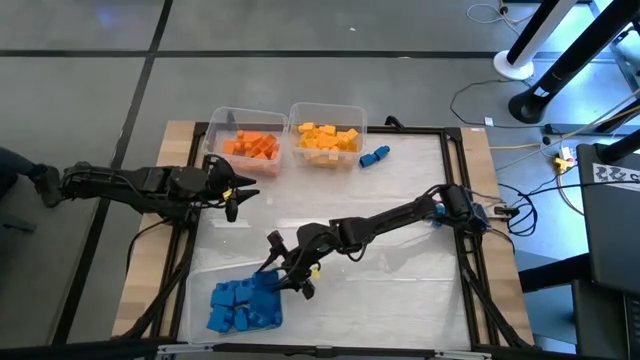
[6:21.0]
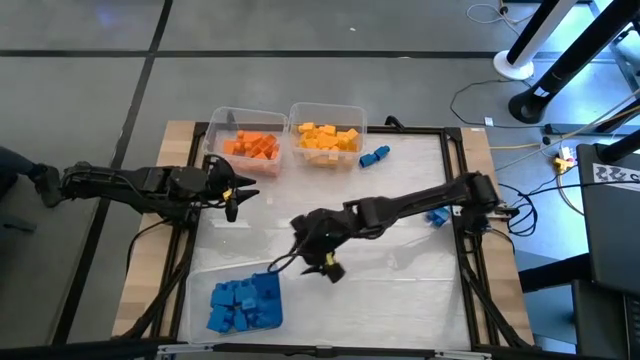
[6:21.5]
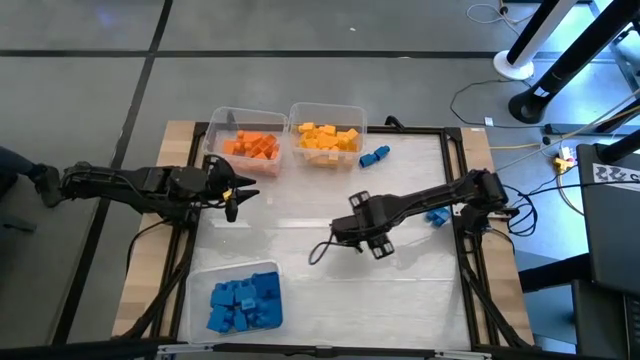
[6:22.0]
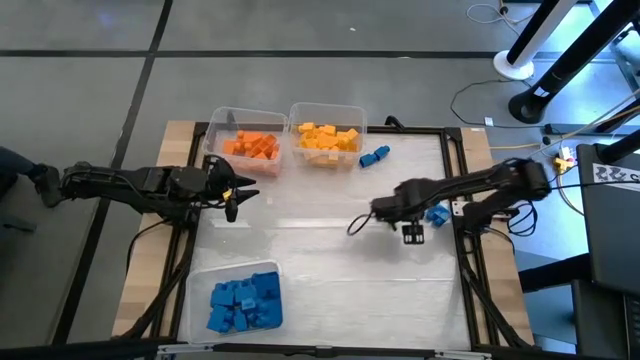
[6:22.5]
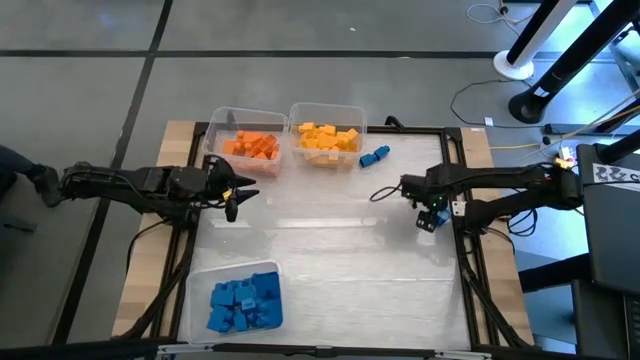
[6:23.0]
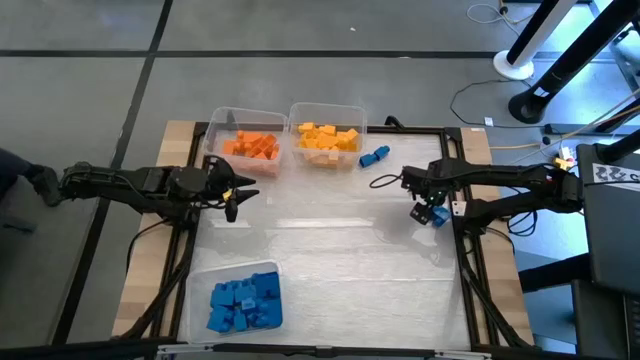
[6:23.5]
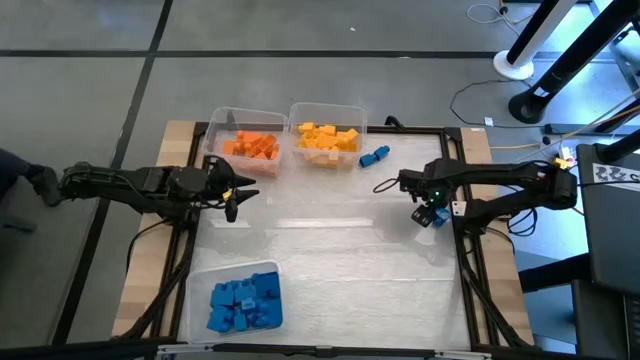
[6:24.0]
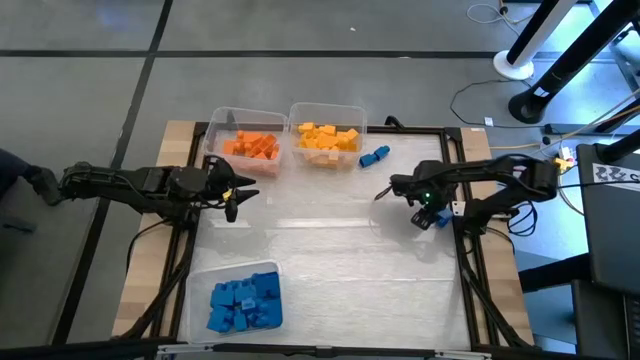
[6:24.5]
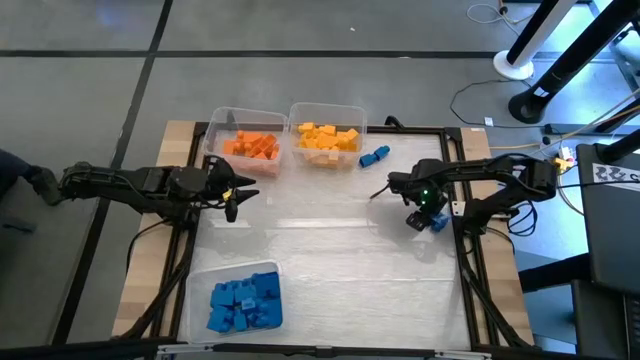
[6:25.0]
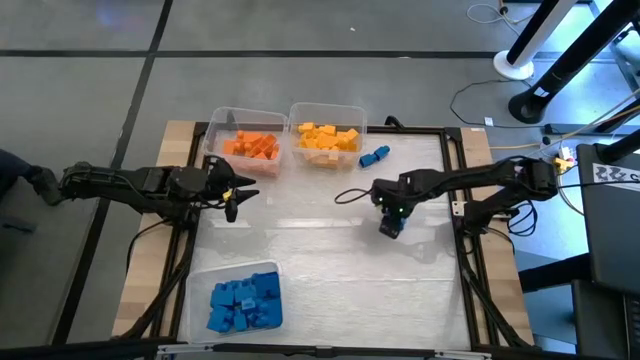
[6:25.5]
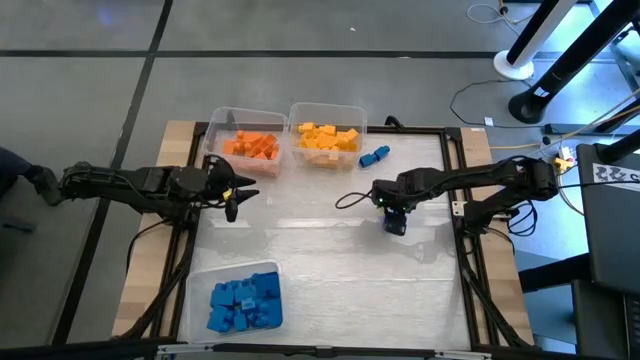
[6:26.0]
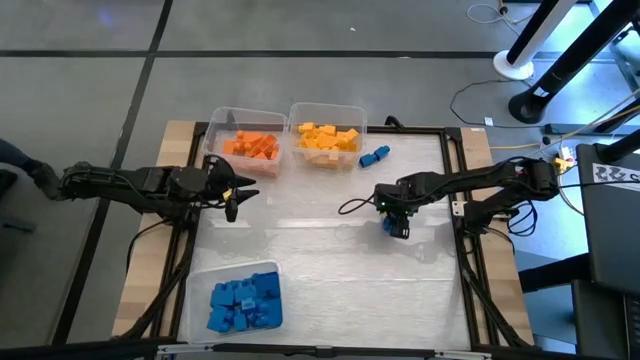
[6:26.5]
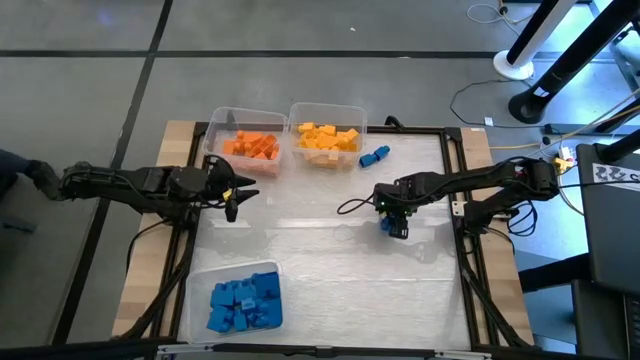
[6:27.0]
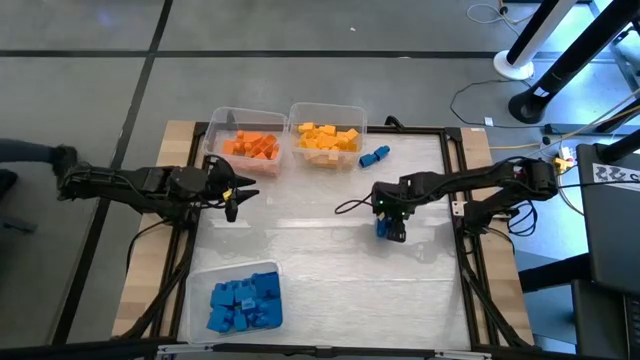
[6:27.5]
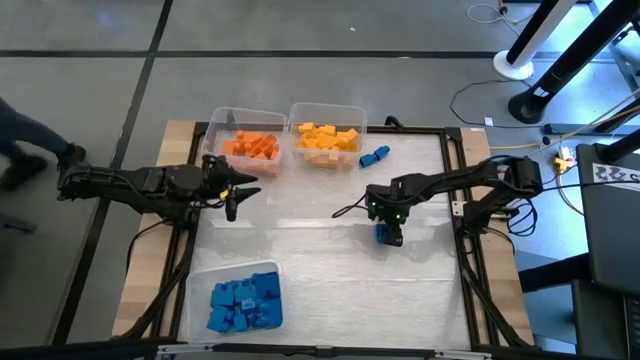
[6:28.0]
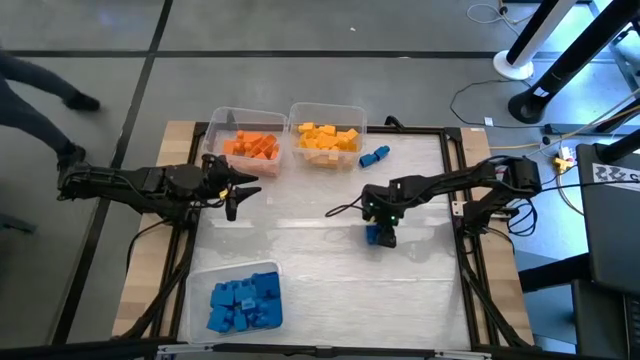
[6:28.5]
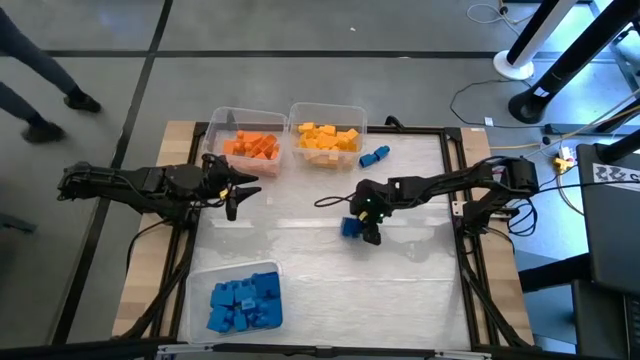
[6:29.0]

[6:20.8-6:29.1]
Task: Sort blocks
Put the blue game piece into the bottom transparent bin

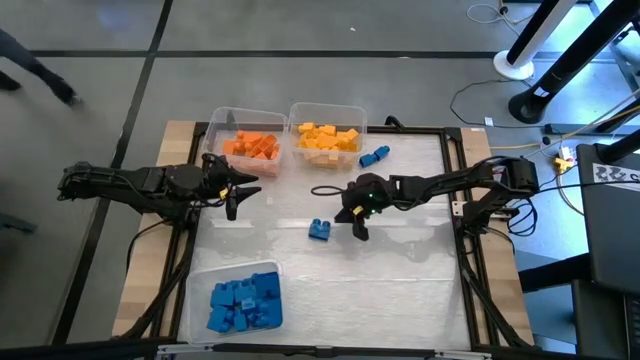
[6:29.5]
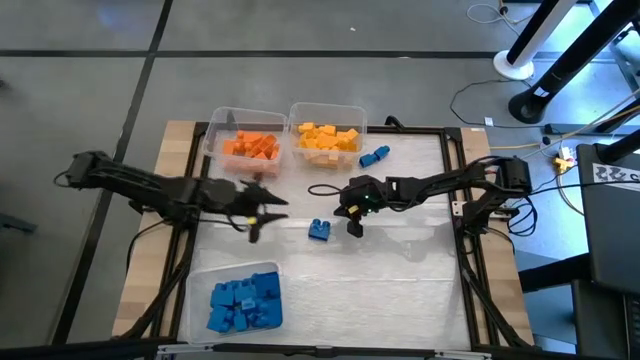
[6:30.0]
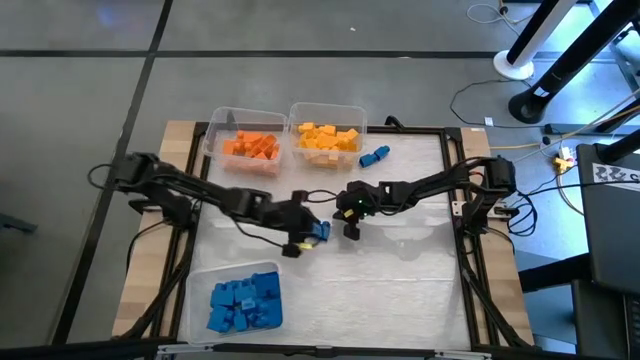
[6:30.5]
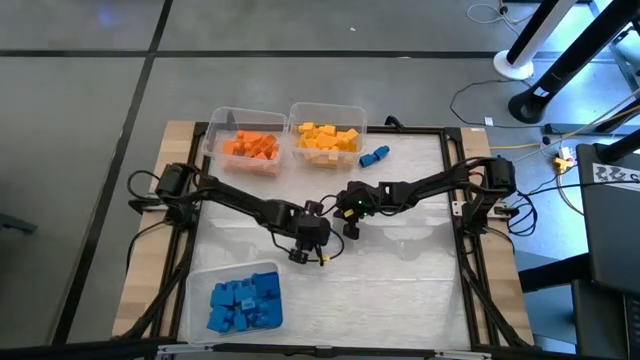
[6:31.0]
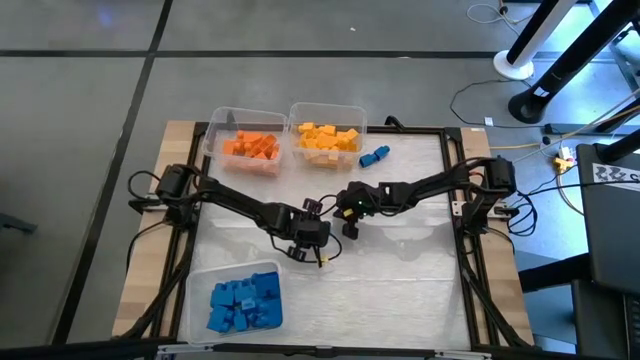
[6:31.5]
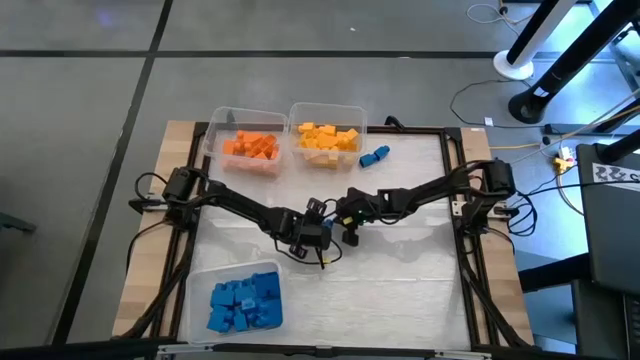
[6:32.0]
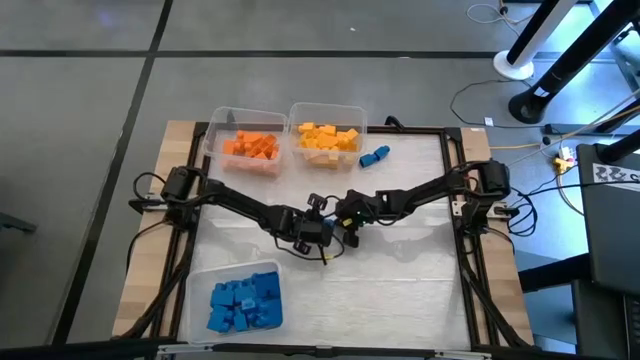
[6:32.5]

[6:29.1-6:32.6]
Put the blue game piece into the bottom transparent bin

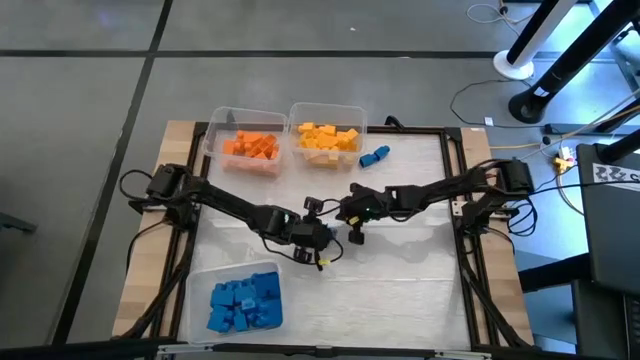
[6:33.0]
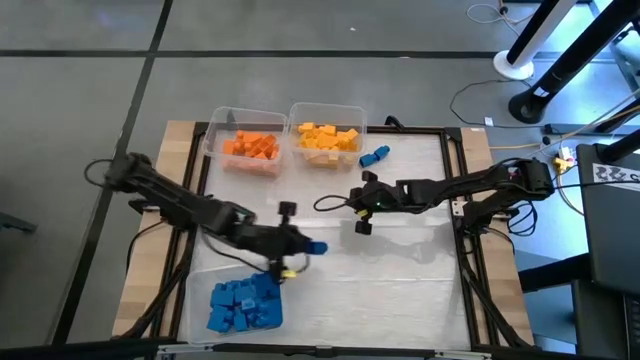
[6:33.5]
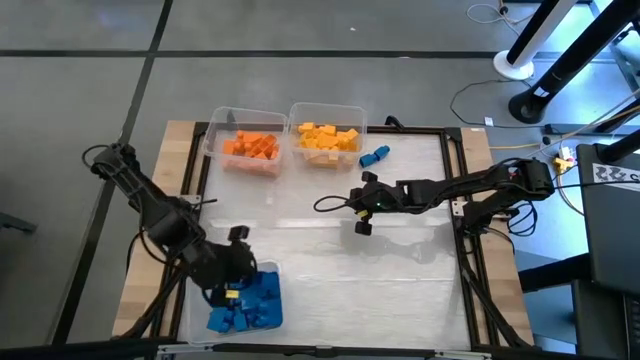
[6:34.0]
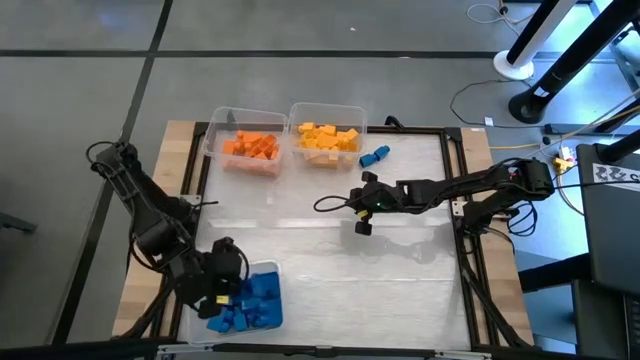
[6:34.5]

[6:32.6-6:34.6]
Put the blue game piece into the bottom transparent bin

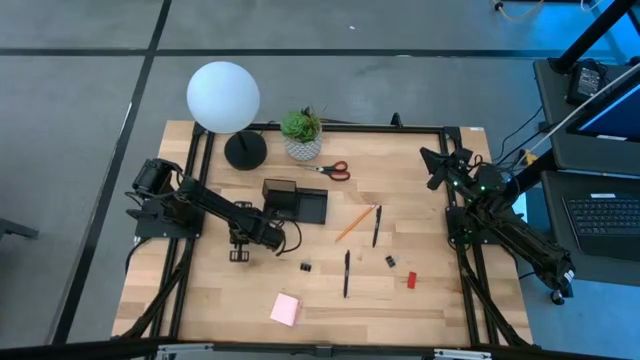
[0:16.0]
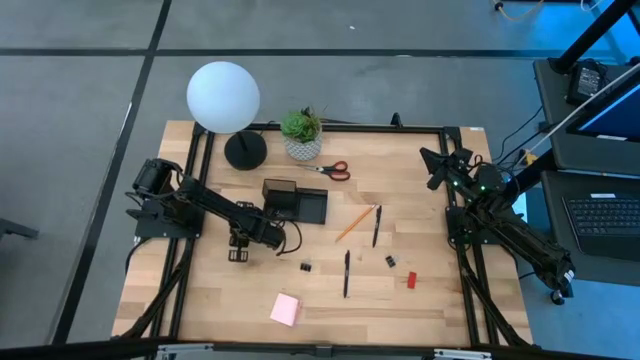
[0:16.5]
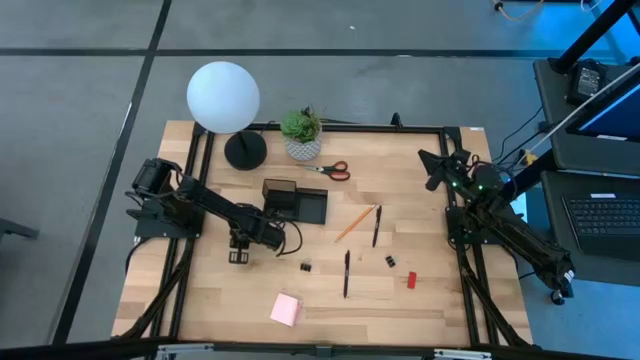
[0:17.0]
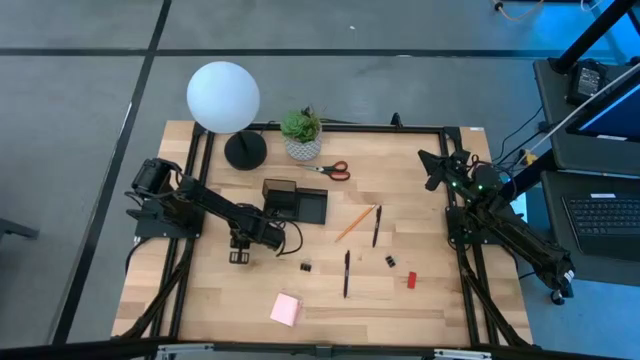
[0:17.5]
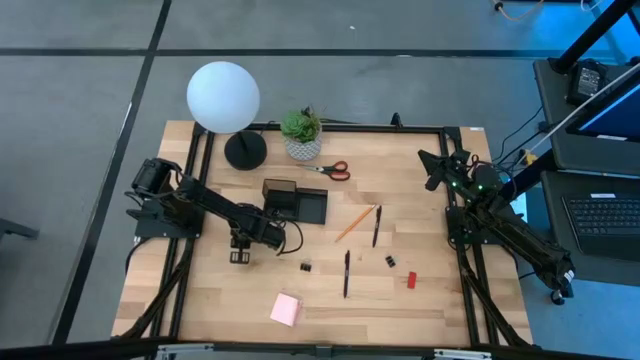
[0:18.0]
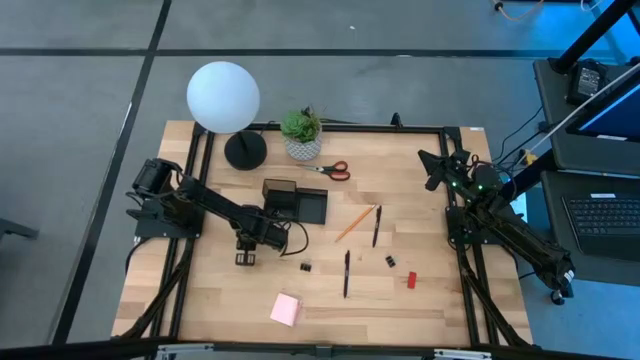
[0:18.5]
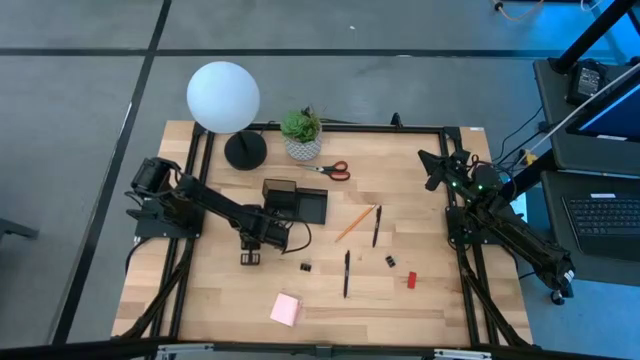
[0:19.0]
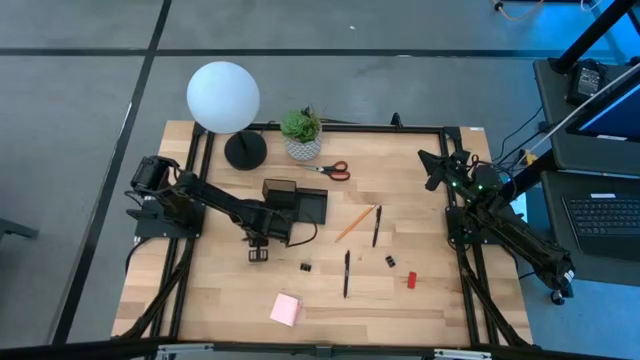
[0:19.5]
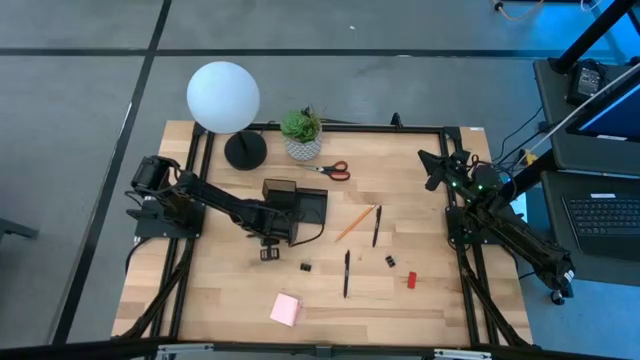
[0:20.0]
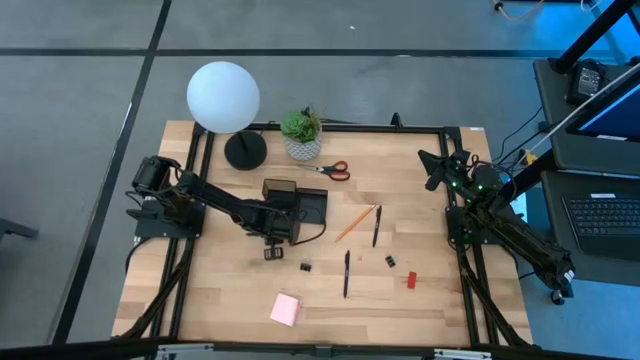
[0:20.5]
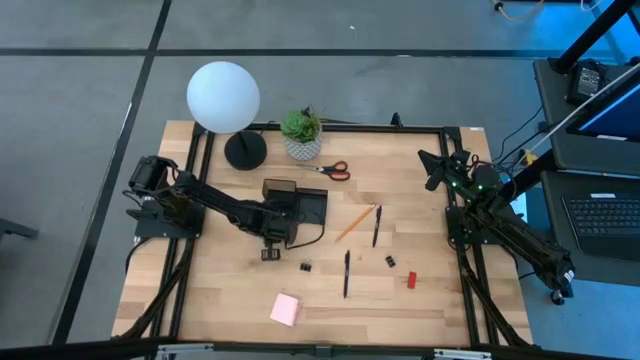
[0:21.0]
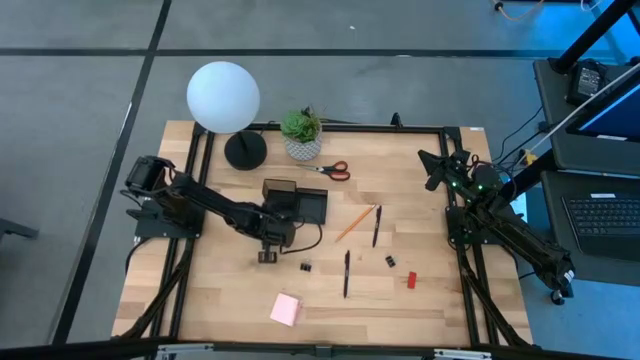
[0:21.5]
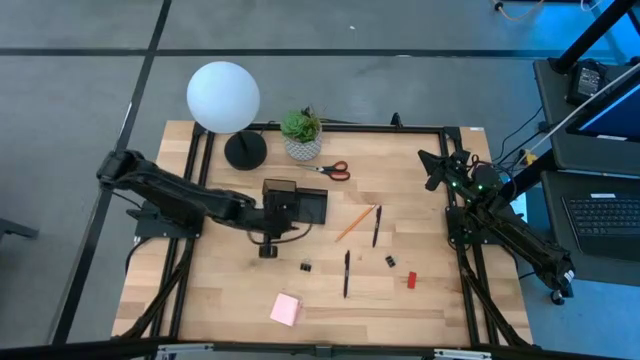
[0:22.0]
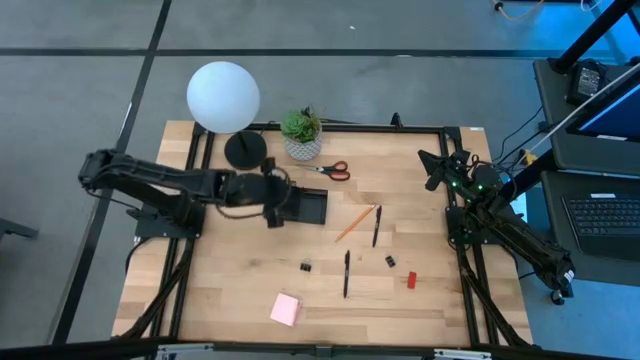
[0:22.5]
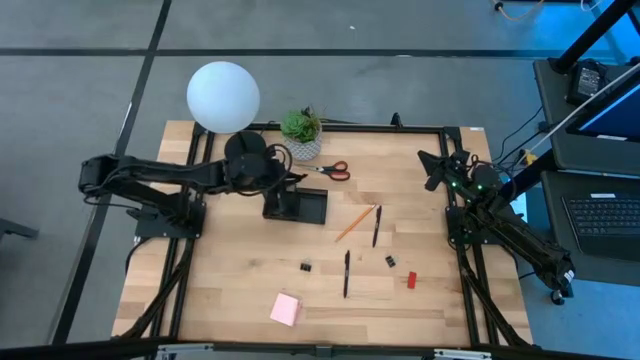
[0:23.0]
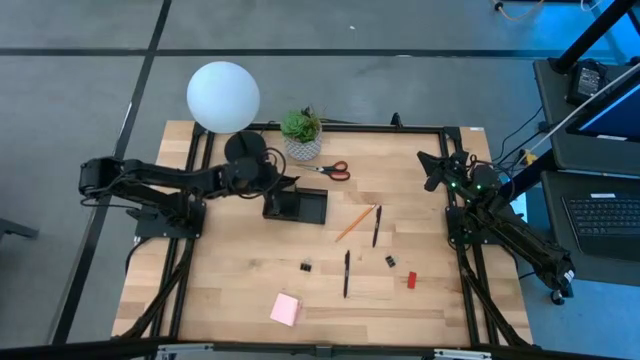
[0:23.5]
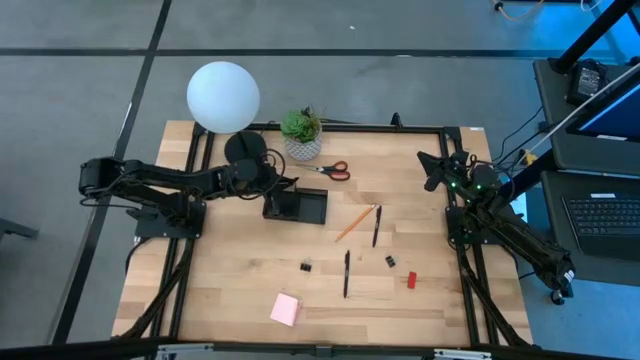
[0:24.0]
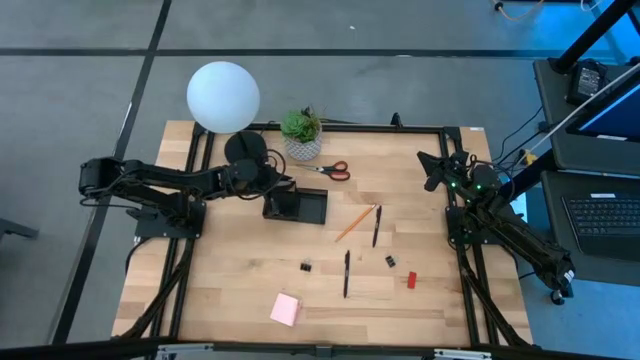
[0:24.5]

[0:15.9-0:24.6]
Task: Pick and place office supplies into organizer
Put the black pen into the black desk organizer
